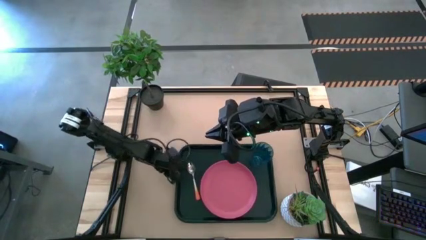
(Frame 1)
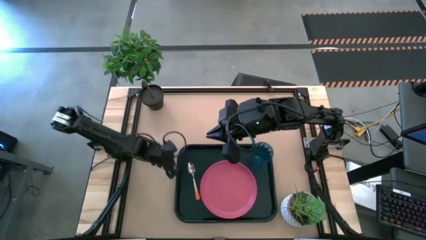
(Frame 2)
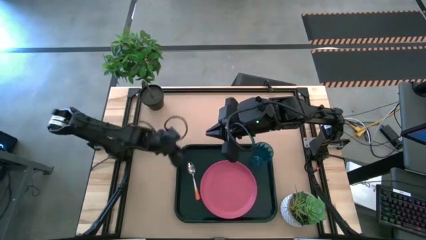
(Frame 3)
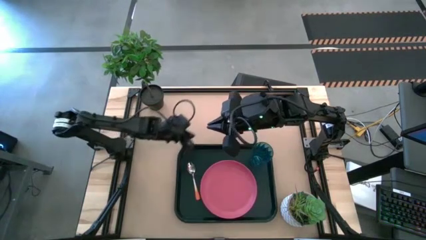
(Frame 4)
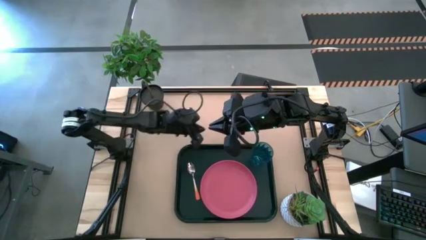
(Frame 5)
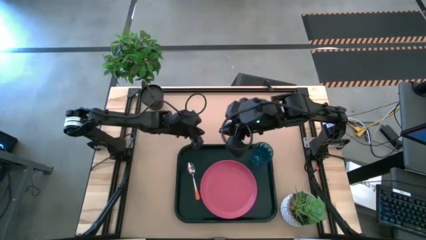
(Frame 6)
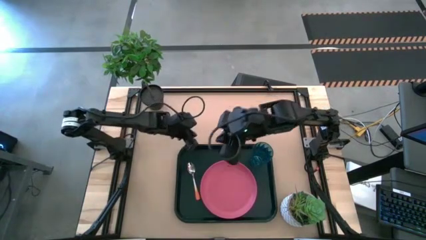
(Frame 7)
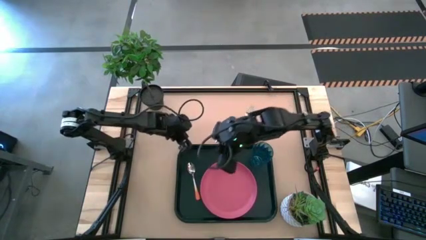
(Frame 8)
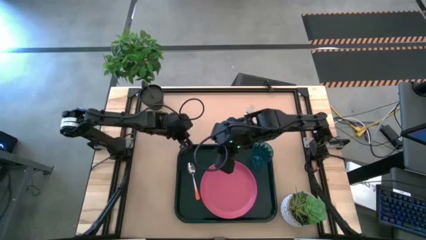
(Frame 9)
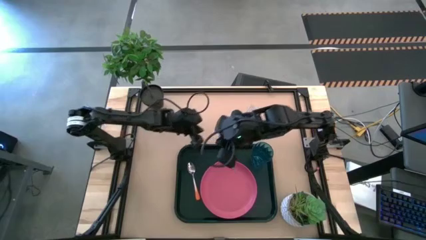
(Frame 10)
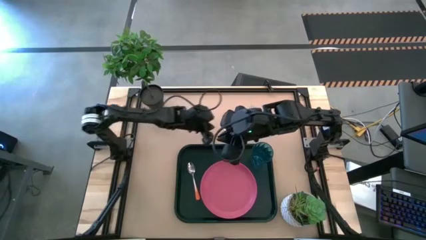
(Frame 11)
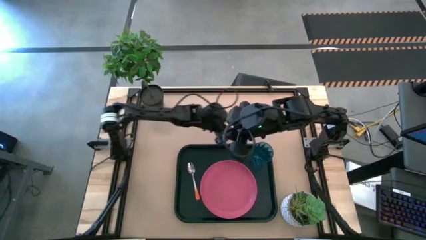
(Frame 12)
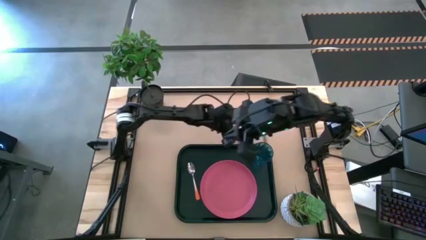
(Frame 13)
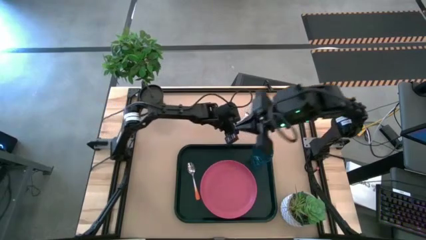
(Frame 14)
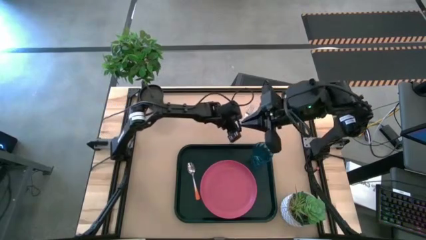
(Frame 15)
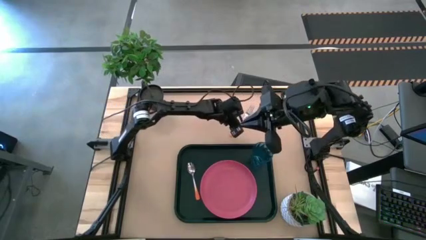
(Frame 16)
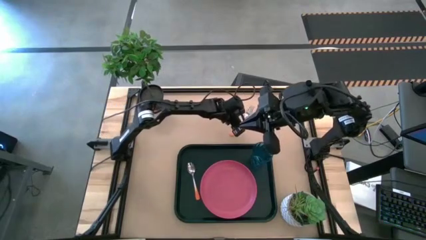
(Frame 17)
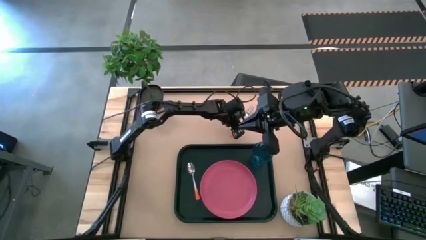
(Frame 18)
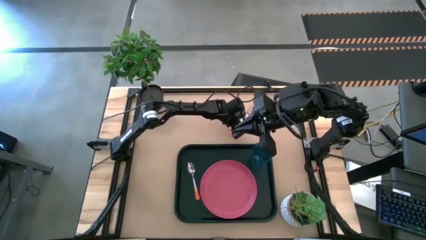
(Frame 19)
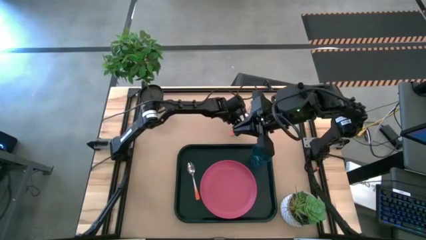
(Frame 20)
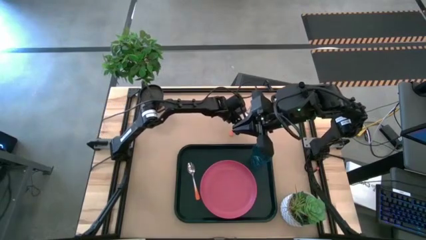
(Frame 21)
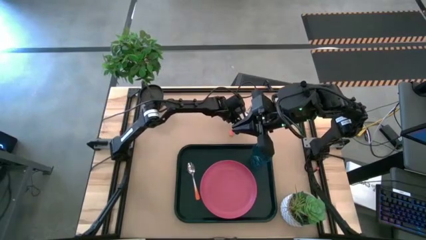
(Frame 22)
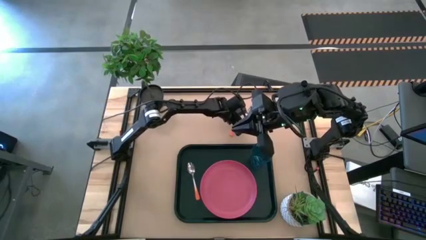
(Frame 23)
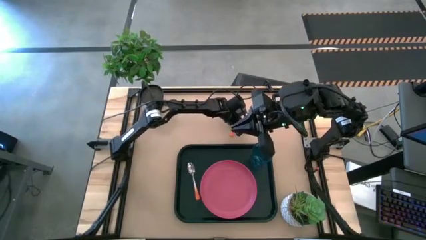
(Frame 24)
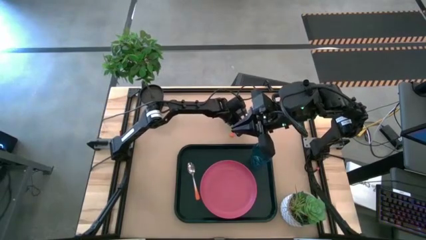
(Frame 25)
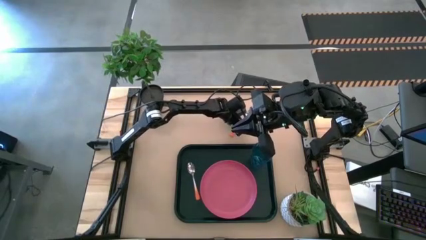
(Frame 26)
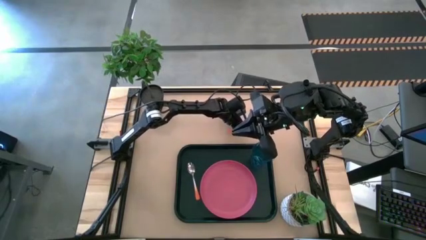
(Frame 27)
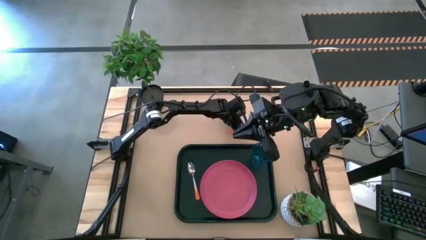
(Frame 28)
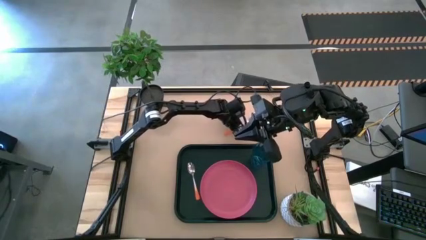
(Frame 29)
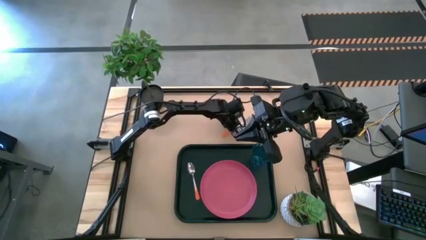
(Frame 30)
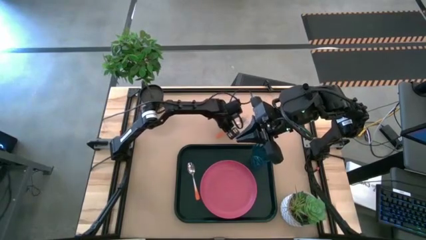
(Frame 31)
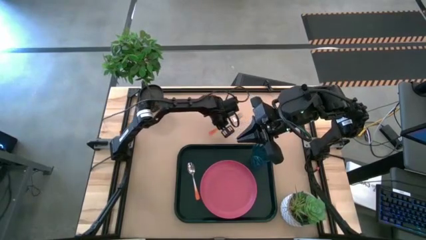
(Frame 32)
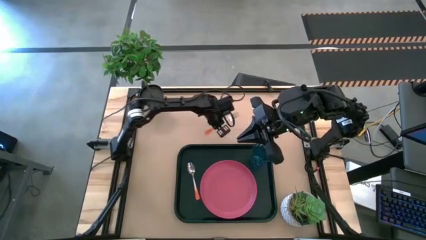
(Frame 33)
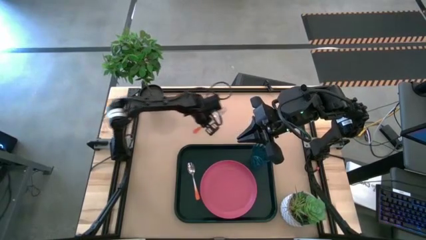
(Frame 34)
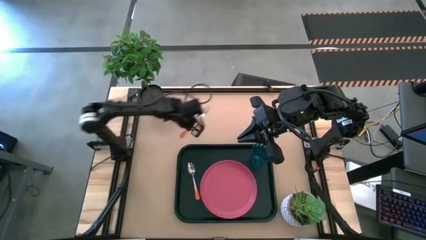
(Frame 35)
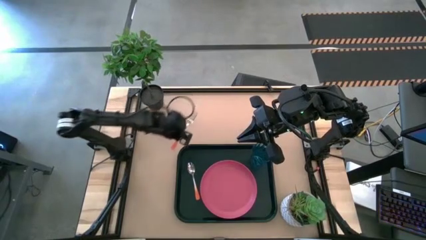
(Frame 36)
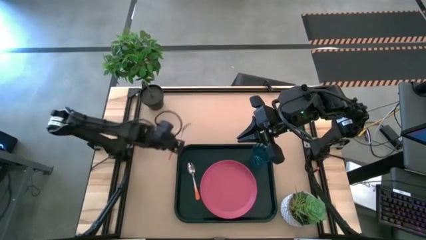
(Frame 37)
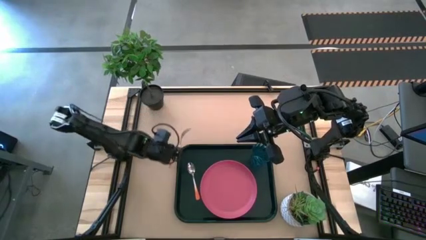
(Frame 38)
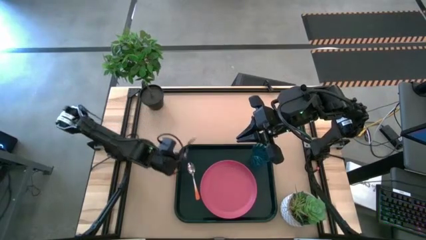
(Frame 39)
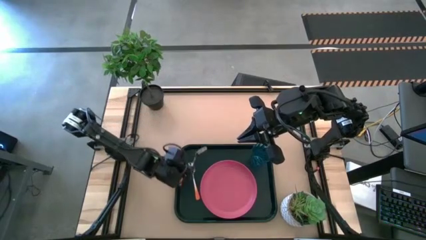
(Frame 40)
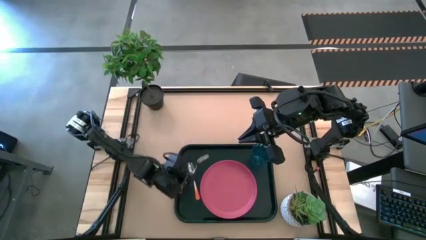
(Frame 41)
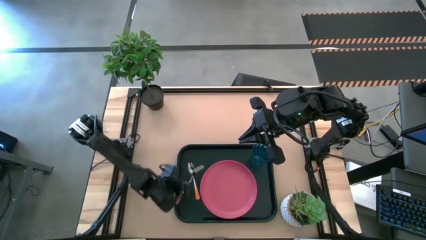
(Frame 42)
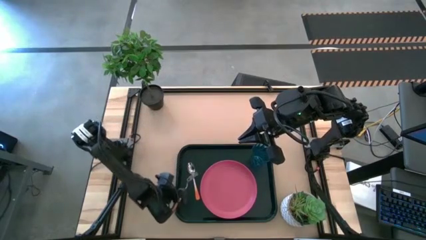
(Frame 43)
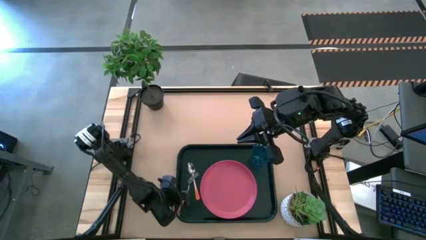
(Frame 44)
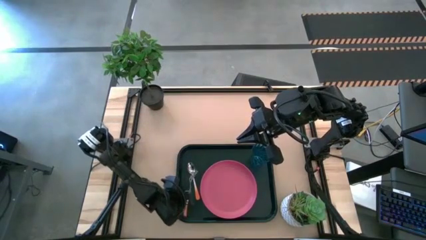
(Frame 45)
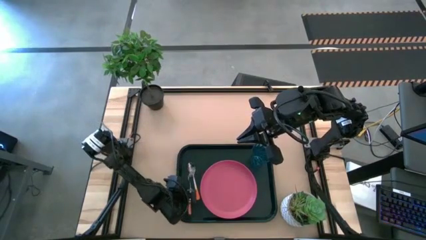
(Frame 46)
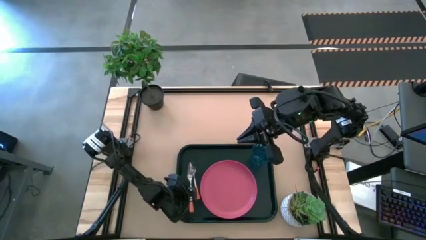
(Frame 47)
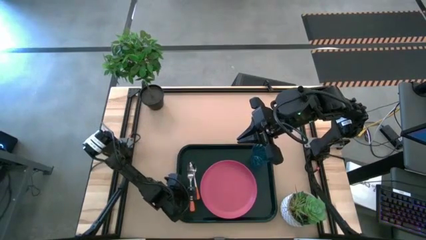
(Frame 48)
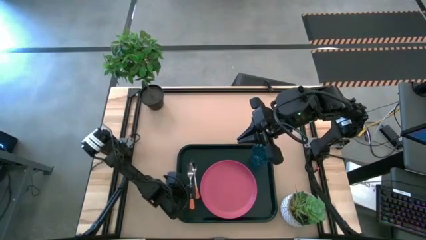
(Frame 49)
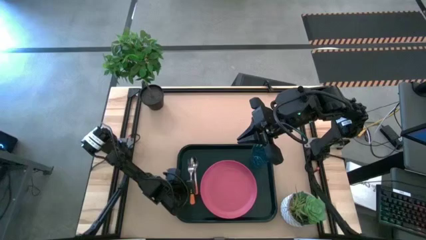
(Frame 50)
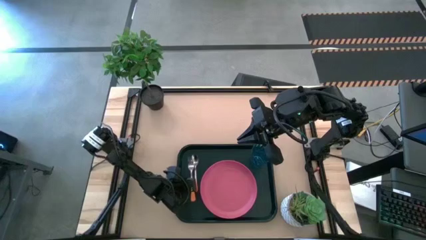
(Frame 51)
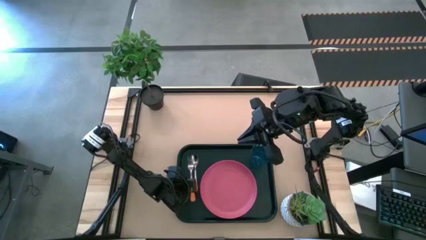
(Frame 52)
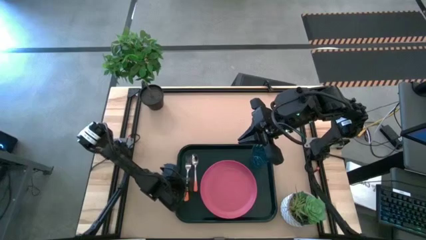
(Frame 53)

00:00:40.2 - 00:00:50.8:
Task: Pick and place plate/cup/fork/spoon on tray
Put the orange fork on the black tray
